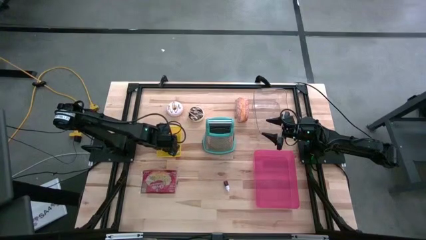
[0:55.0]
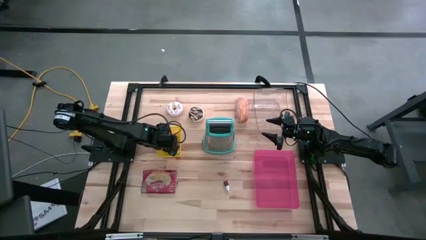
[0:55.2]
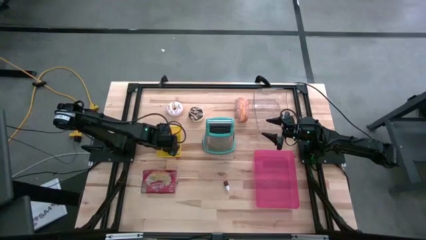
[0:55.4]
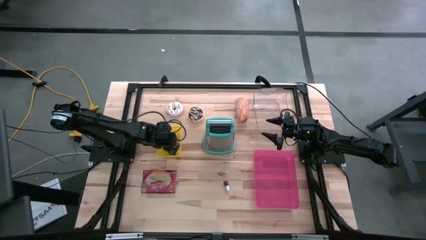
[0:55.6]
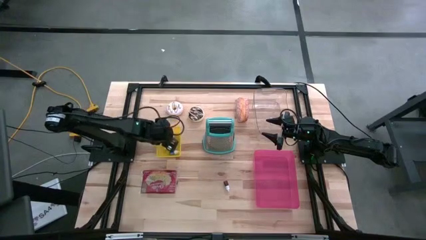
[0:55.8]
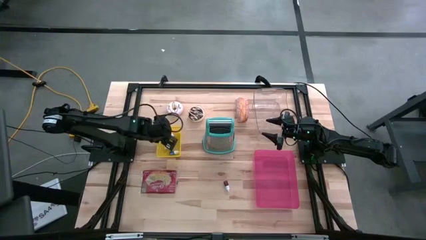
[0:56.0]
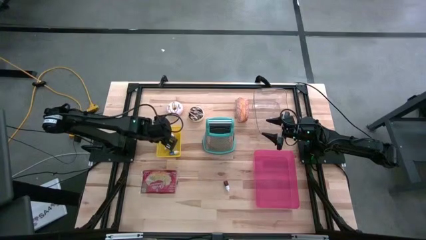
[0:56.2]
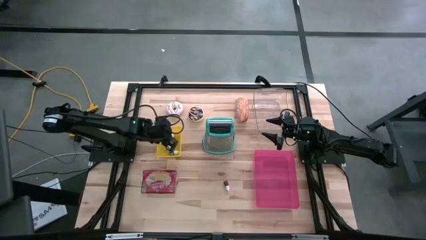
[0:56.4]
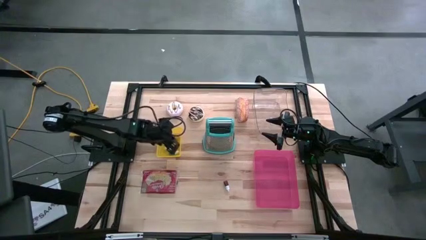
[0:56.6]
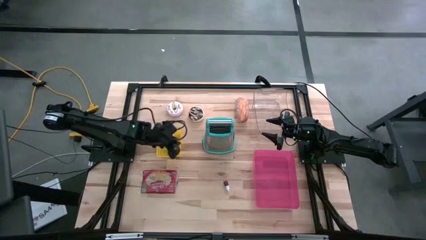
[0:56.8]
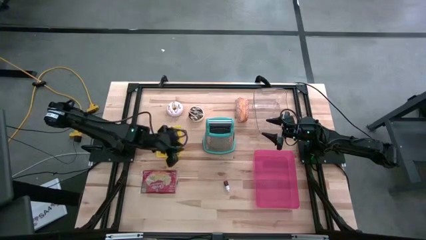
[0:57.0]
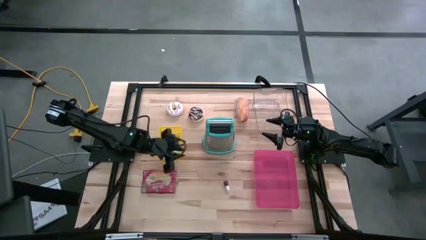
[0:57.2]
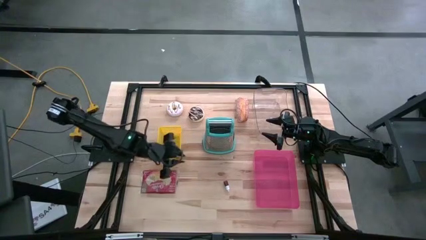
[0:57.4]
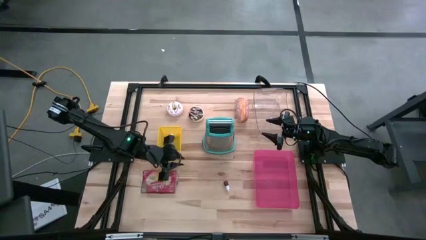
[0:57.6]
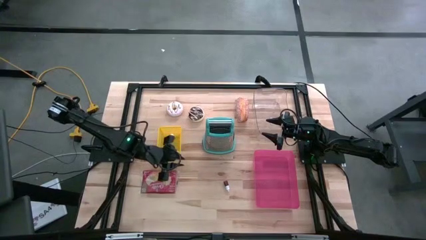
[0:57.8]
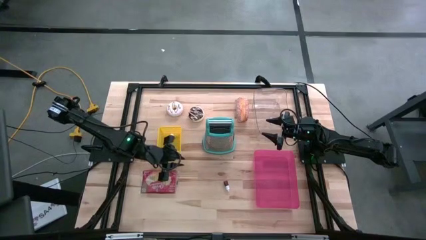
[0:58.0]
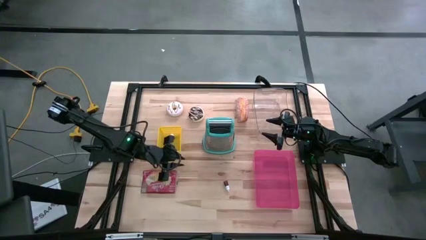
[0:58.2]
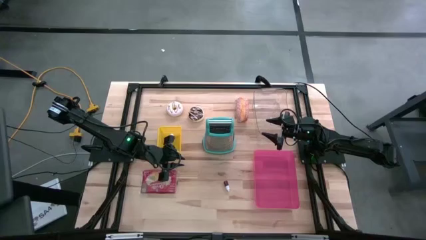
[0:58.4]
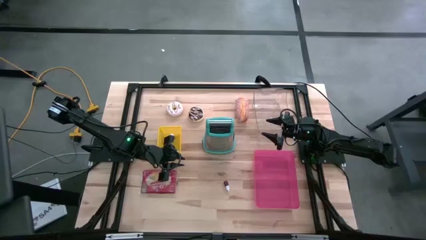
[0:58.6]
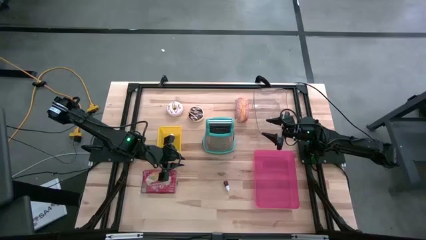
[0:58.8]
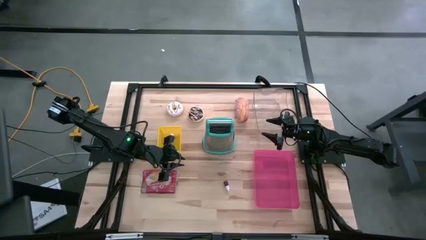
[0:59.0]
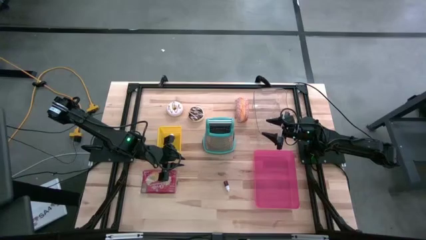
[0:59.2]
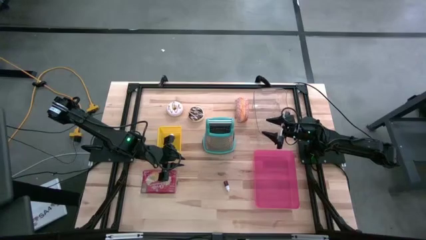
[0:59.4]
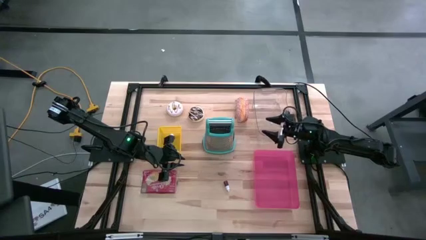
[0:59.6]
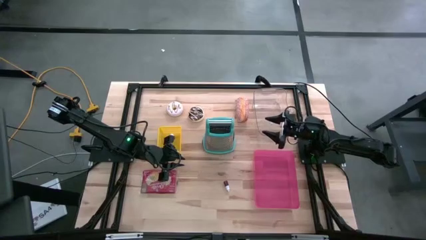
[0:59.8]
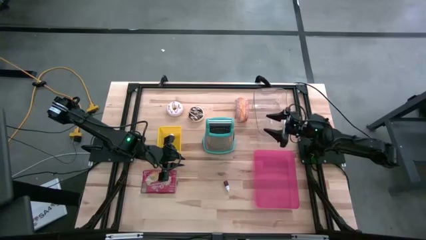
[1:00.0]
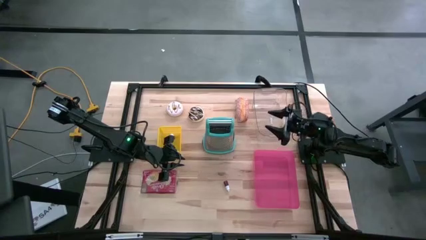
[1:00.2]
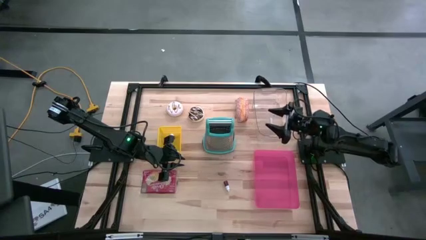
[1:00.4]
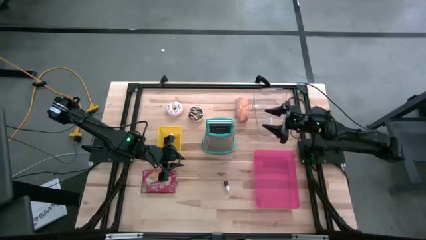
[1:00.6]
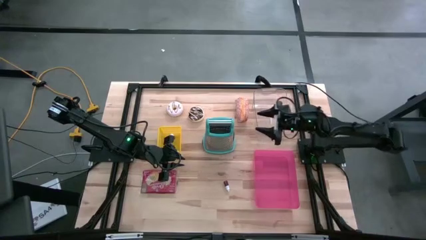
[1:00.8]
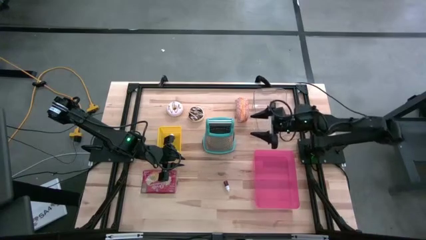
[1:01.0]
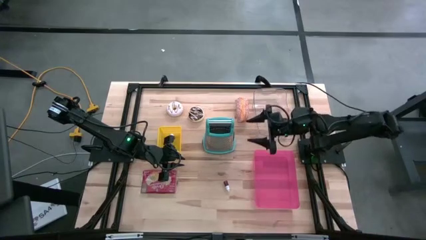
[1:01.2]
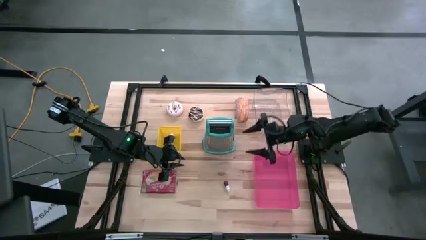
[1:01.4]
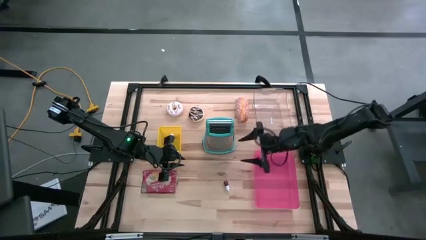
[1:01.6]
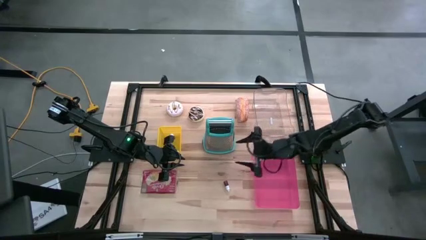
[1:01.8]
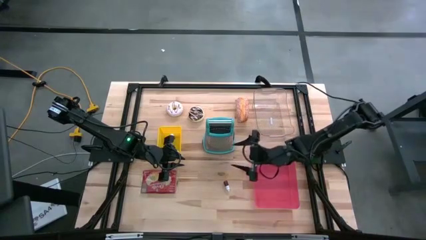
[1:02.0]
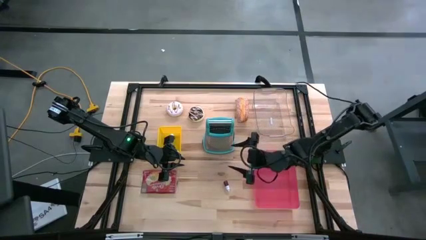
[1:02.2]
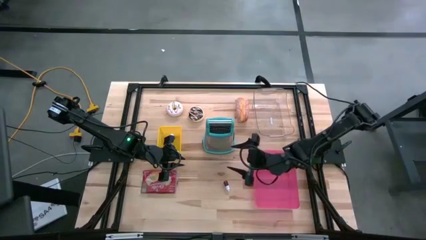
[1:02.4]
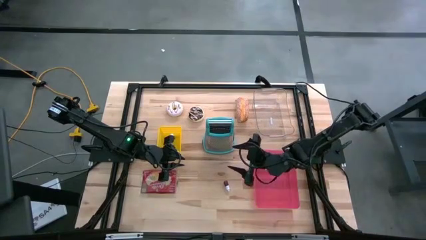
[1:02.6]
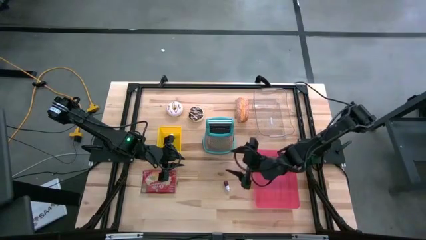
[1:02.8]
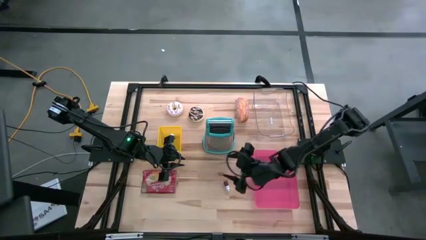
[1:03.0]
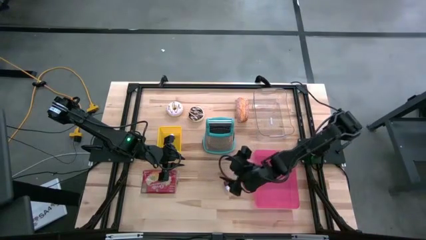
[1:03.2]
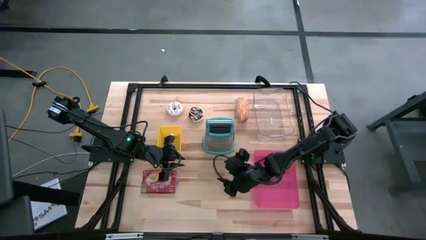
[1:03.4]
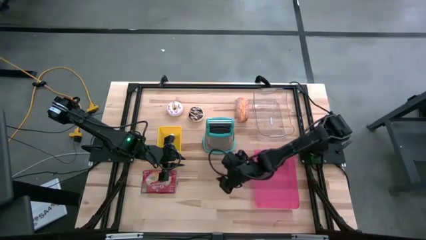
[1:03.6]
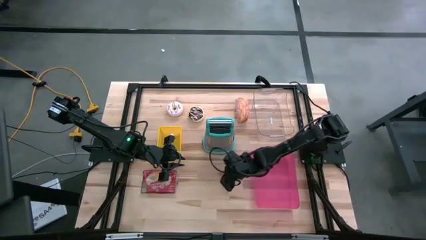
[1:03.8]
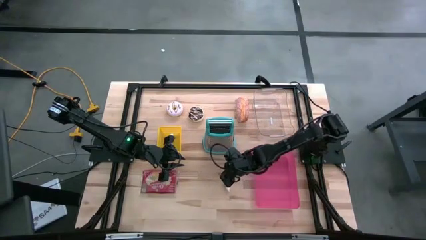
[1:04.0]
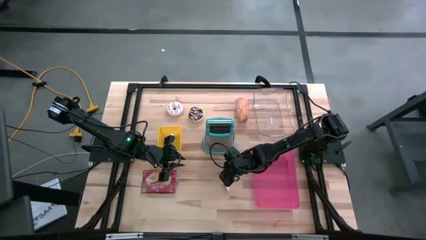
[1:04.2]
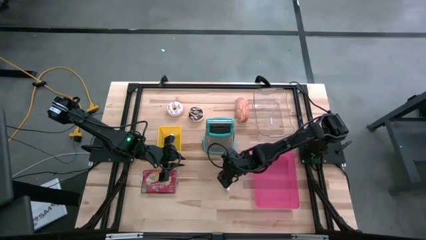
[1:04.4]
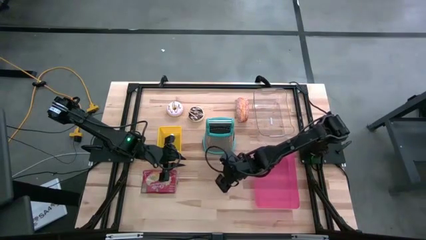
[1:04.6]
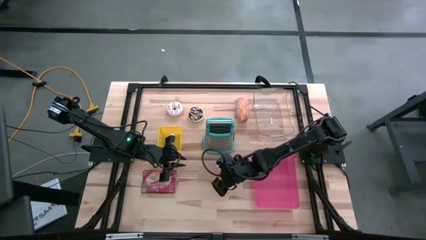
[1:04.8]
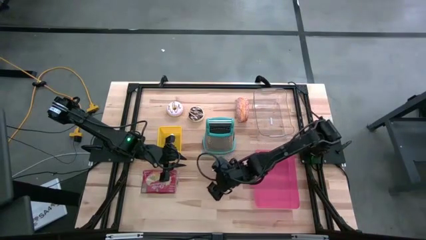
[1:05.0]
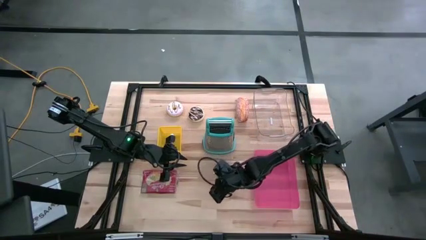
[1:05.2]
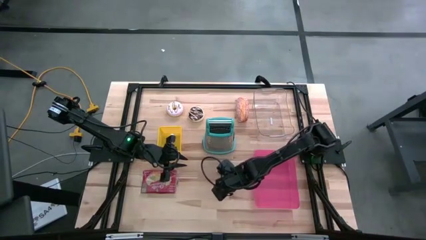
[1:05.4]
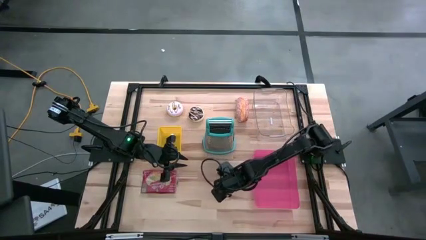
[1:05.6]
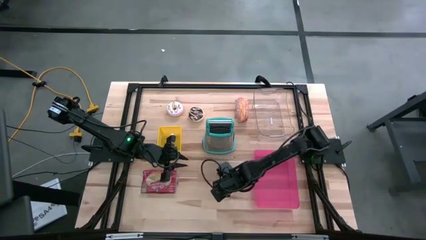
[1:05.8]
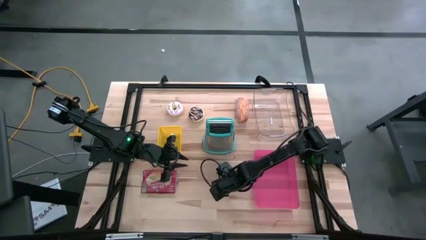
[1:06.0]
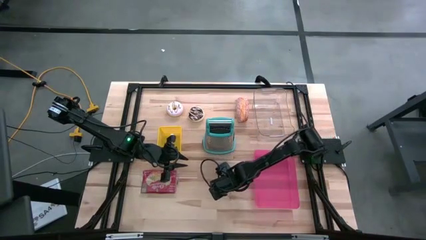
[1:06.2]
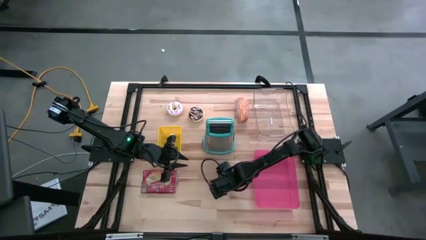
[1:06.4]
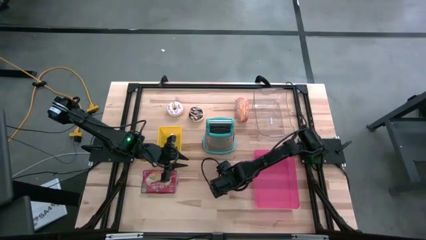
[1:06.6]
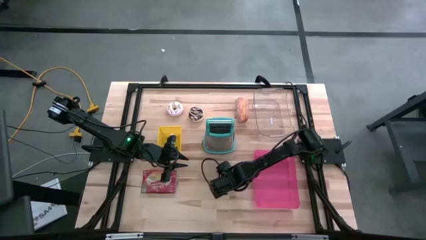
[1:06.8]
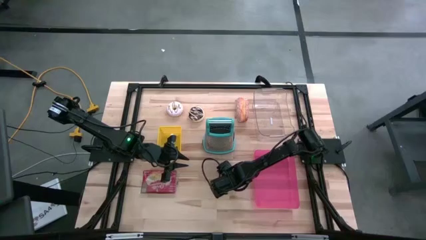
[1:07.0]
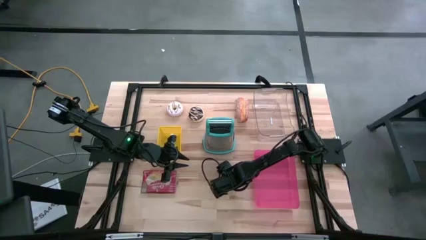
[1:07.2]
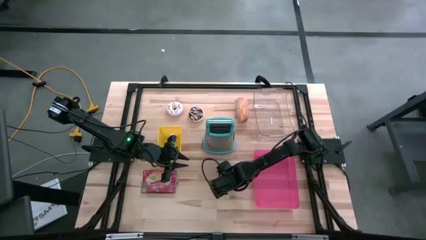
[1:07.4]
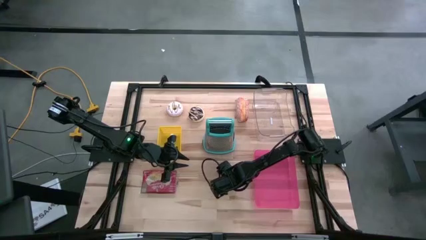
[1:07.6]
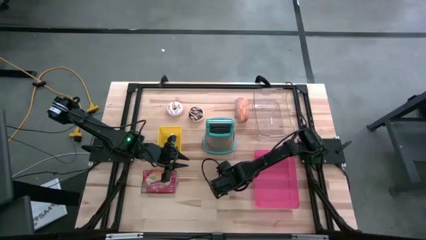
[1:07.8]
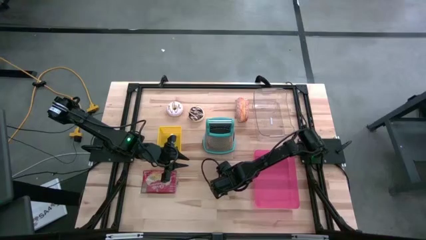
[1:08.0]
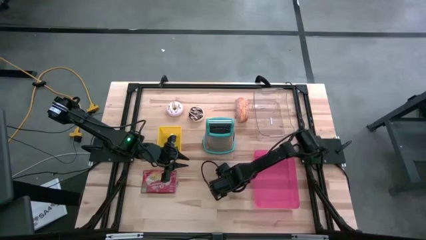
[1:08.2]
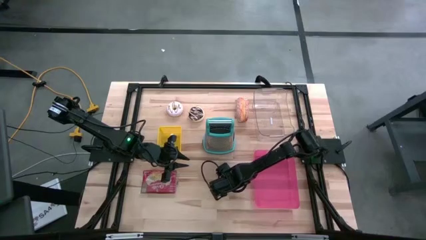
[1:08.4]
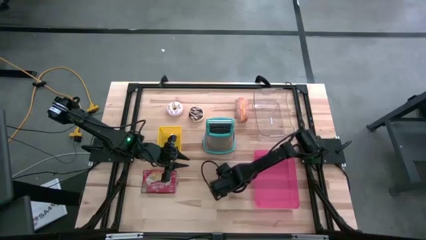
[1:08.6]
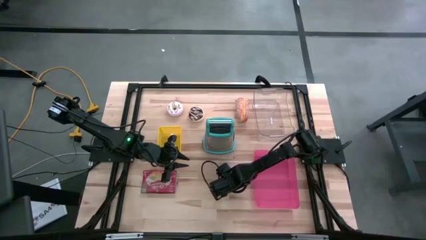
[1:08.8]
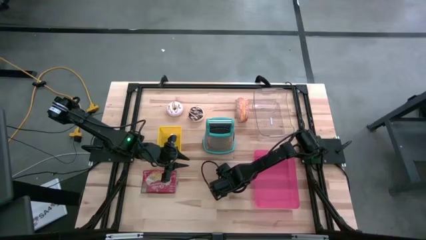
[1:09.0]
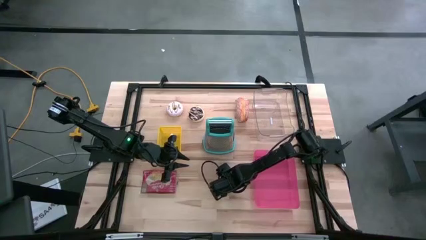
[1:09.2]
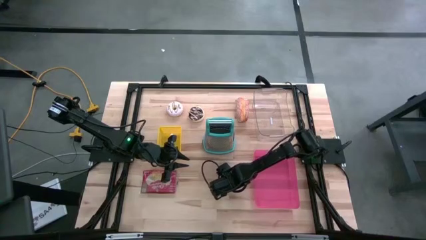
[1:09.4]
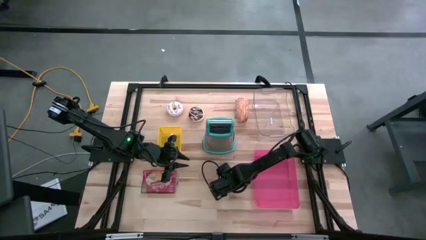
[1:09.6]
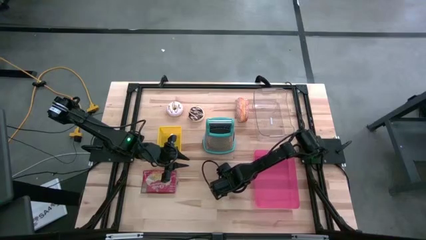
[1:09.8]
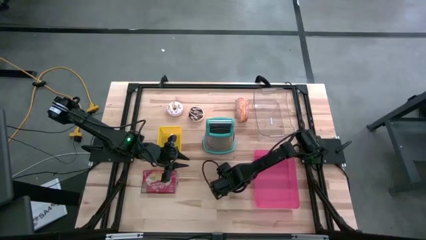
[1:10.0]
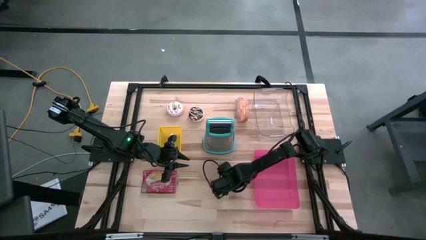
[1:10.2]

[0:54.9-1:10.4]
Put the orange food coloring bottle into the yellow bin
